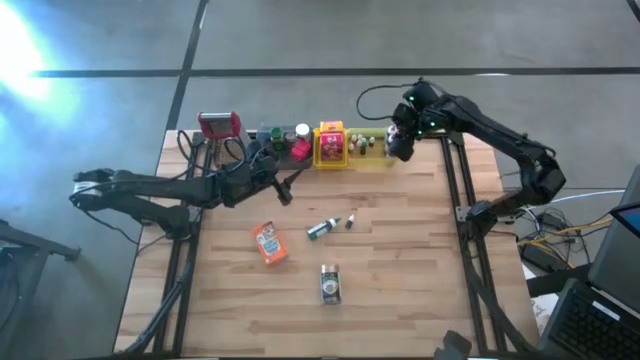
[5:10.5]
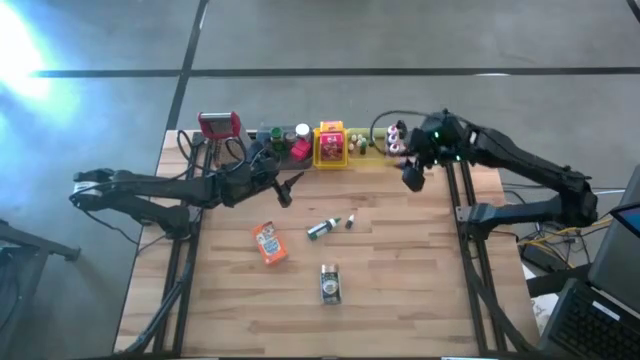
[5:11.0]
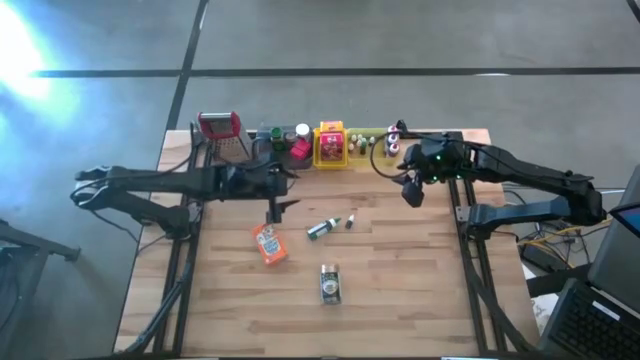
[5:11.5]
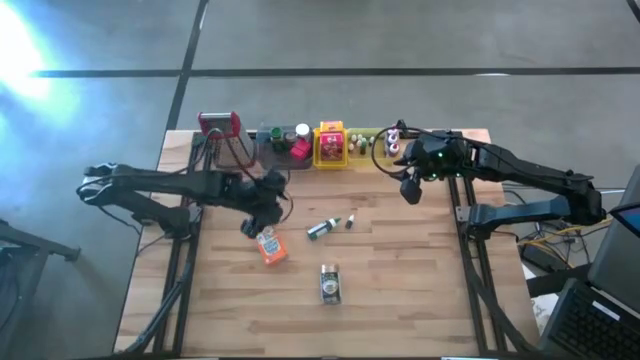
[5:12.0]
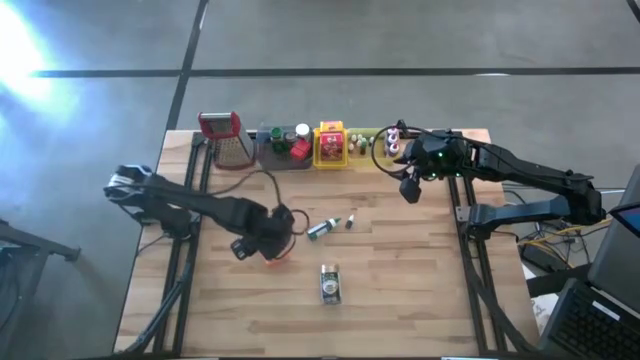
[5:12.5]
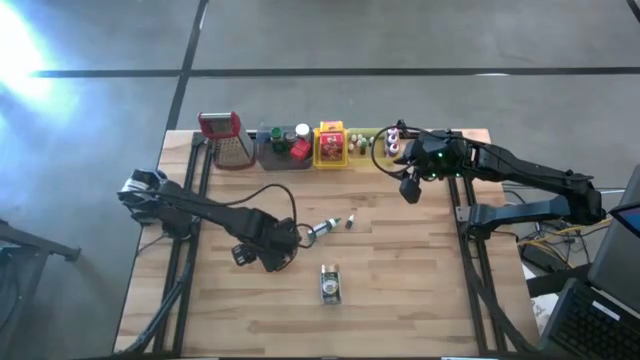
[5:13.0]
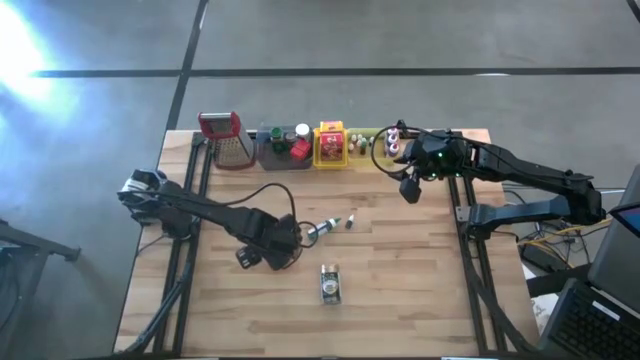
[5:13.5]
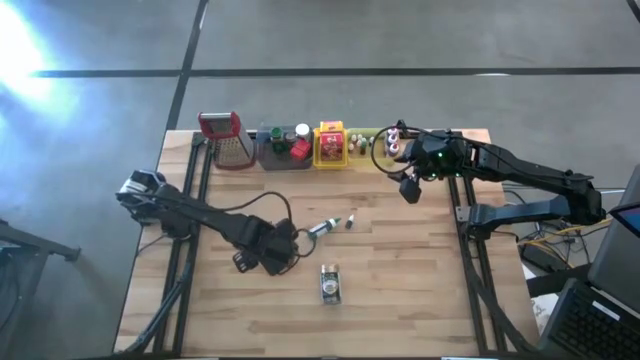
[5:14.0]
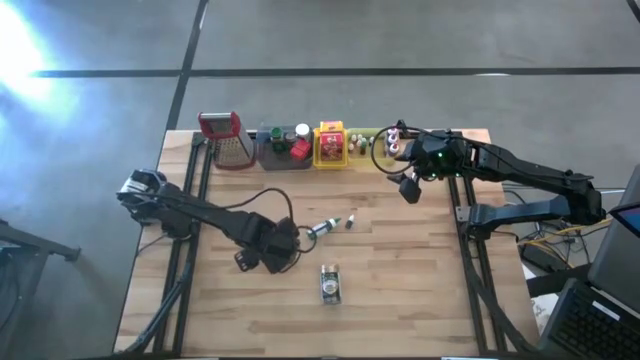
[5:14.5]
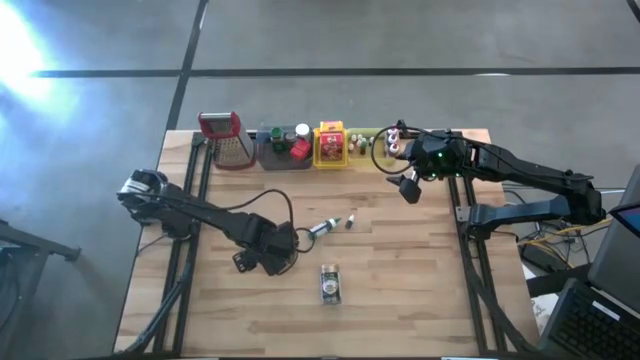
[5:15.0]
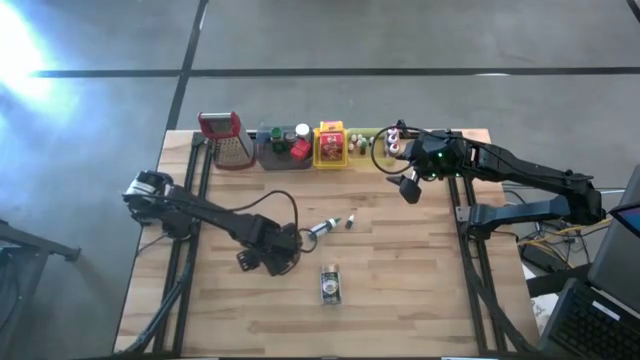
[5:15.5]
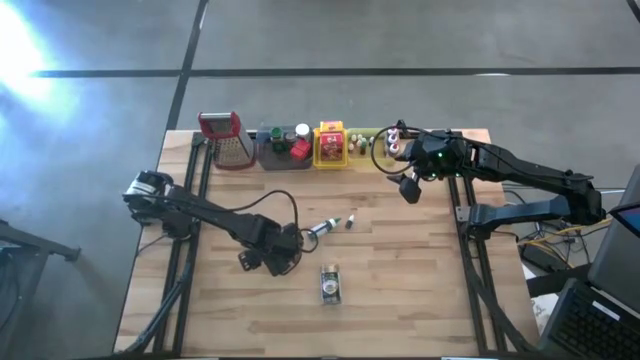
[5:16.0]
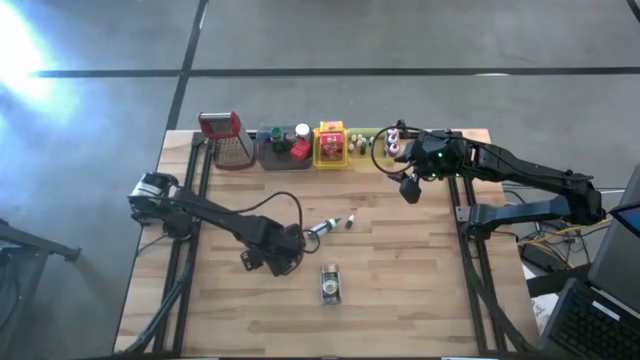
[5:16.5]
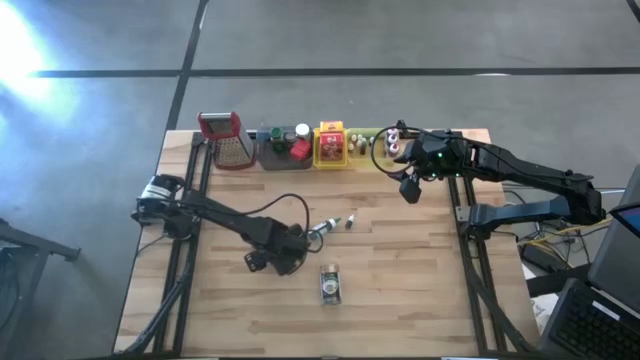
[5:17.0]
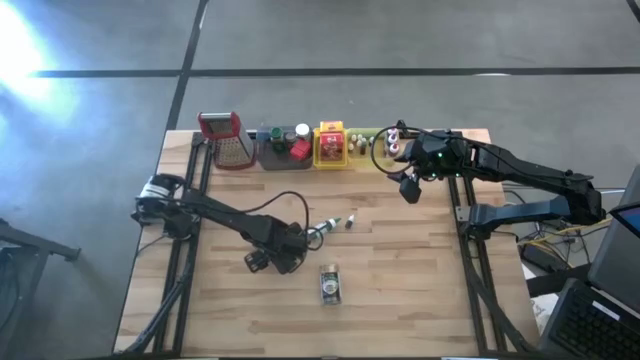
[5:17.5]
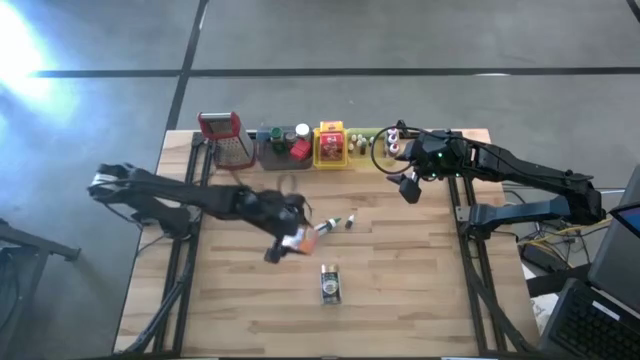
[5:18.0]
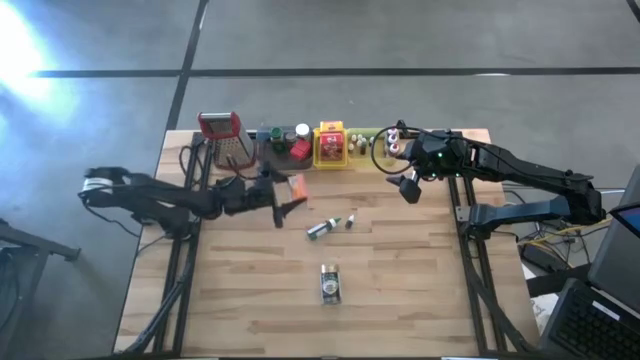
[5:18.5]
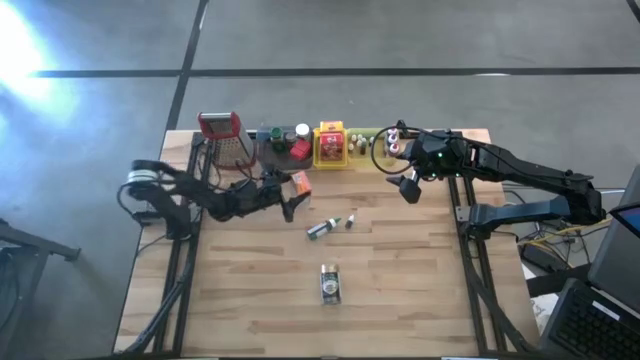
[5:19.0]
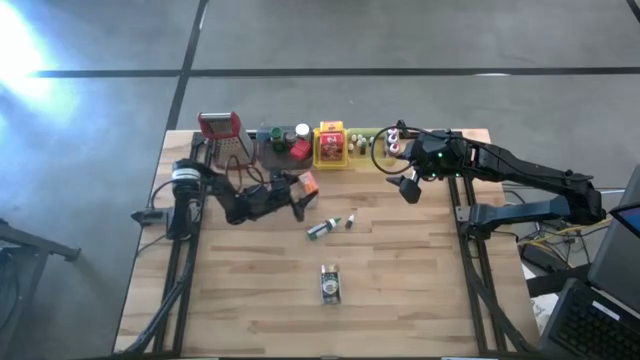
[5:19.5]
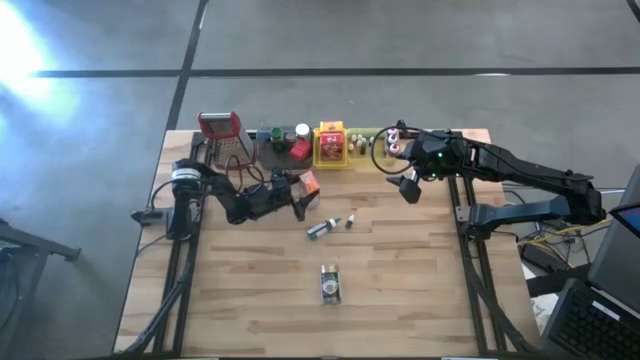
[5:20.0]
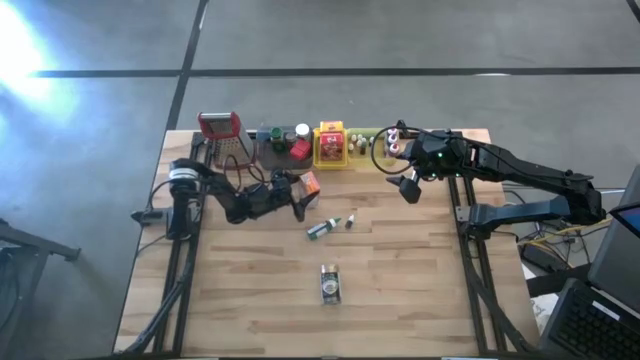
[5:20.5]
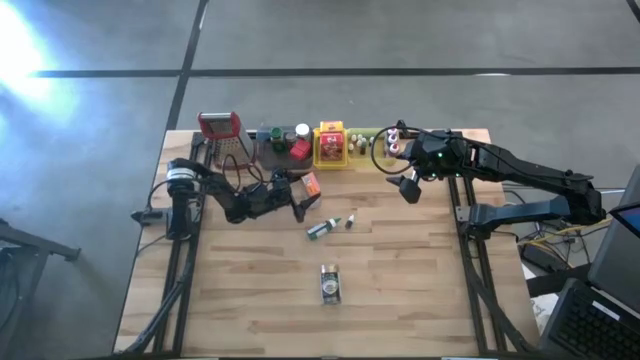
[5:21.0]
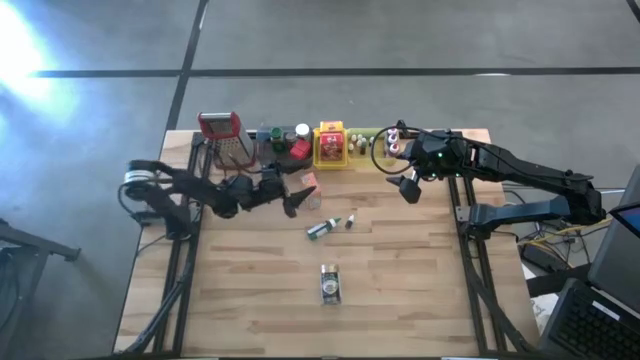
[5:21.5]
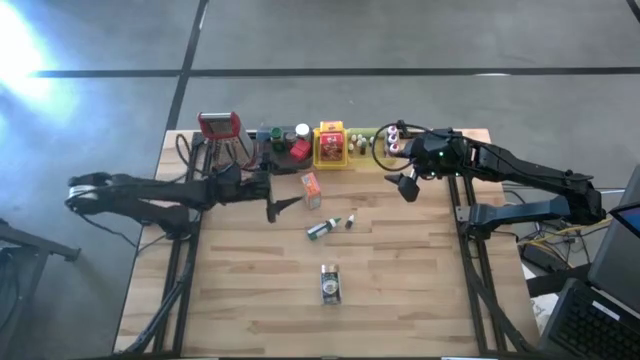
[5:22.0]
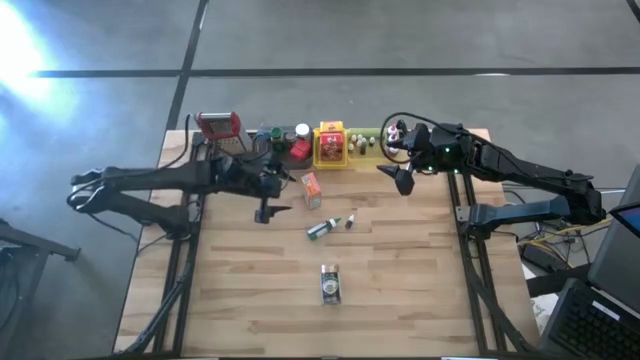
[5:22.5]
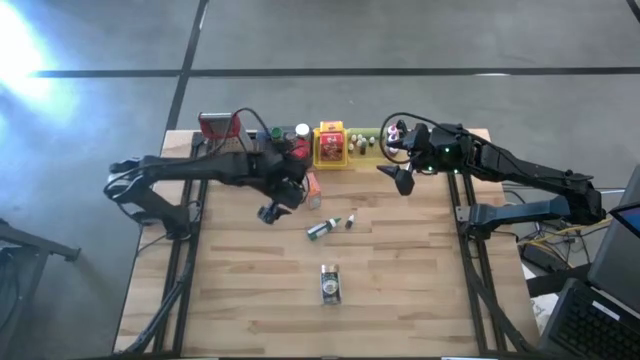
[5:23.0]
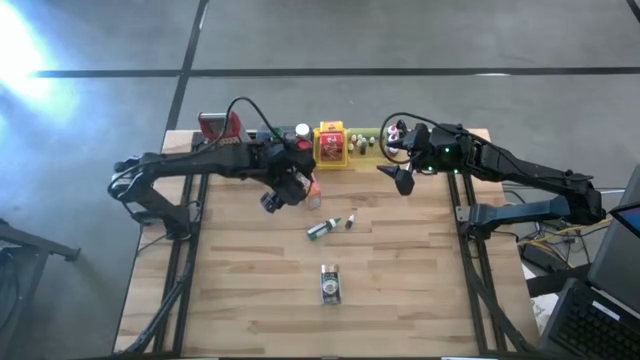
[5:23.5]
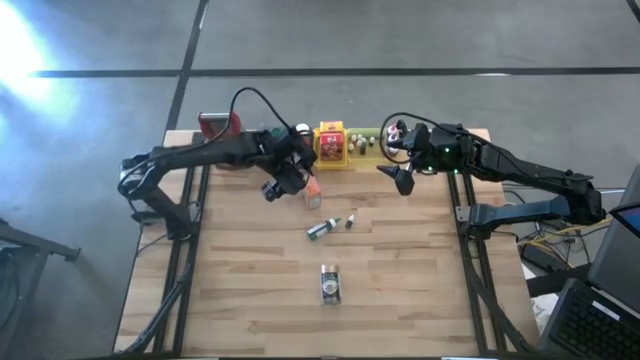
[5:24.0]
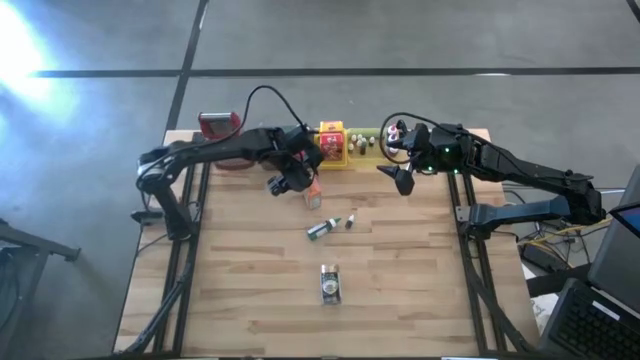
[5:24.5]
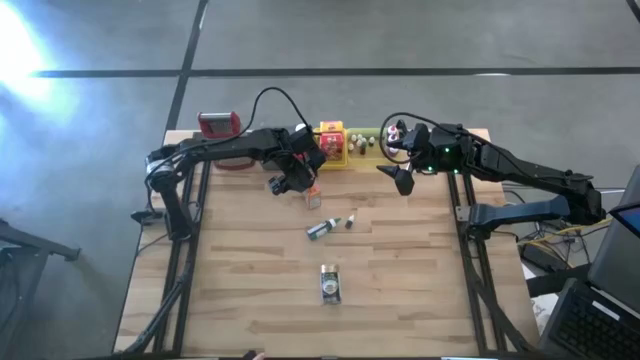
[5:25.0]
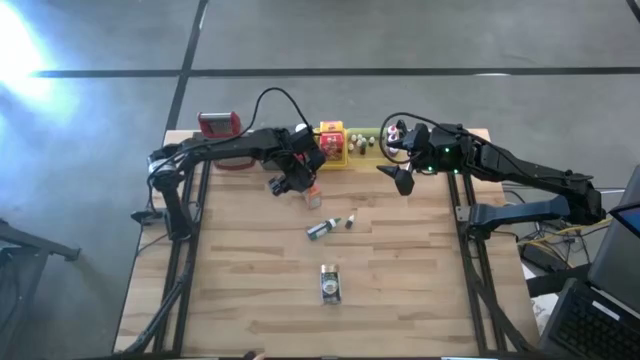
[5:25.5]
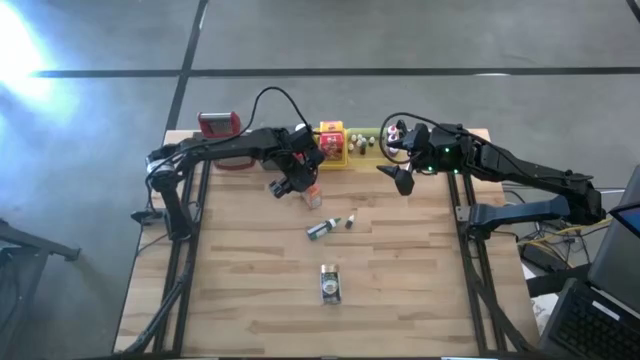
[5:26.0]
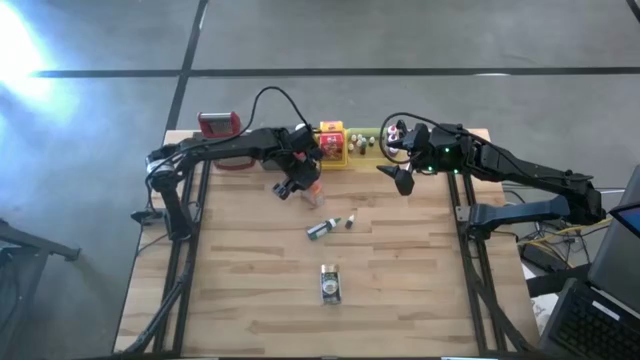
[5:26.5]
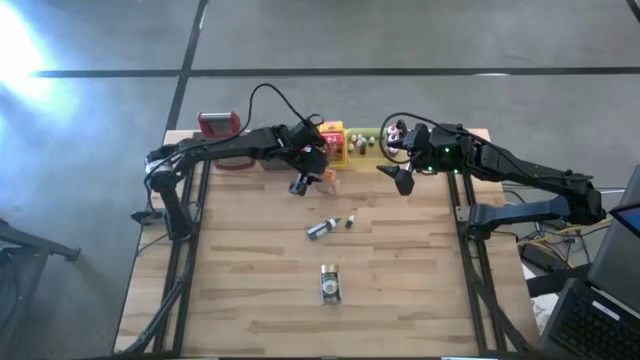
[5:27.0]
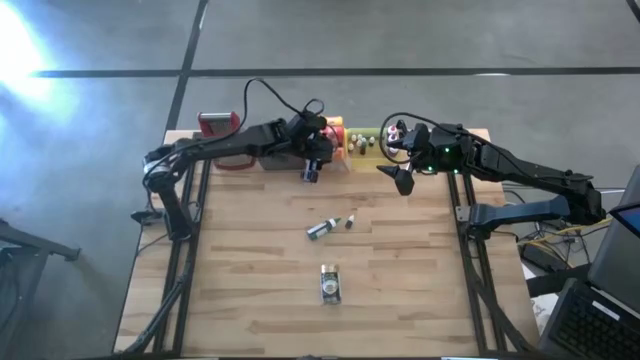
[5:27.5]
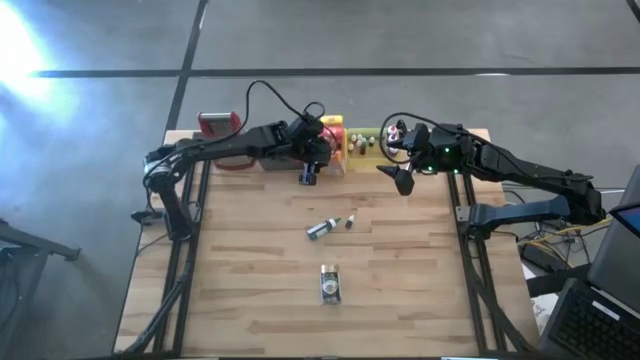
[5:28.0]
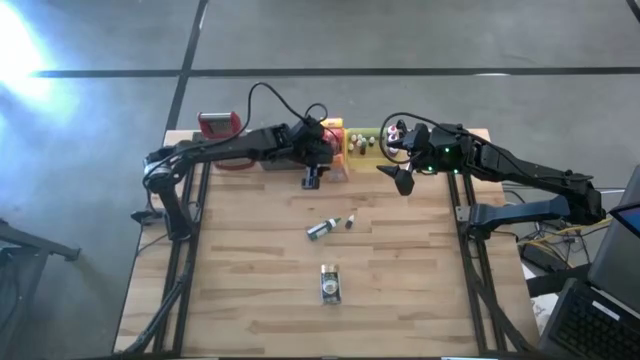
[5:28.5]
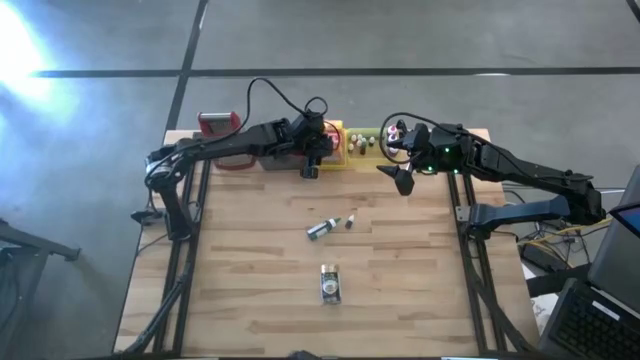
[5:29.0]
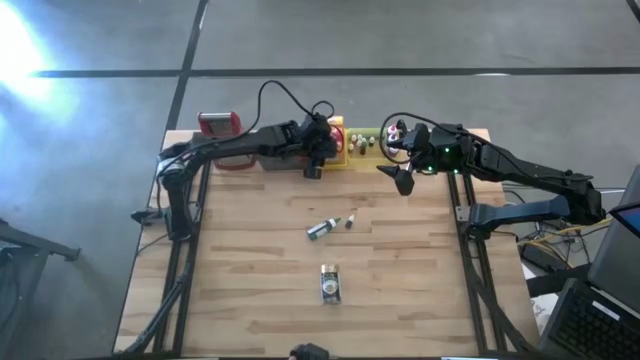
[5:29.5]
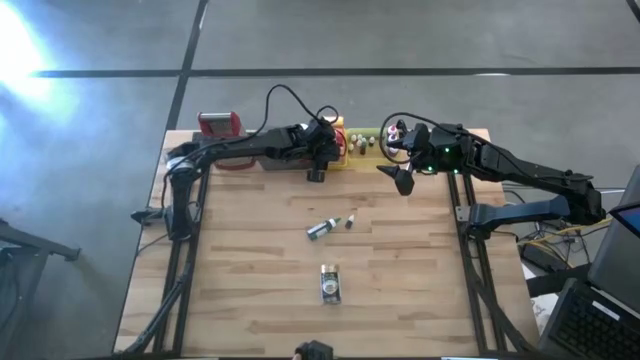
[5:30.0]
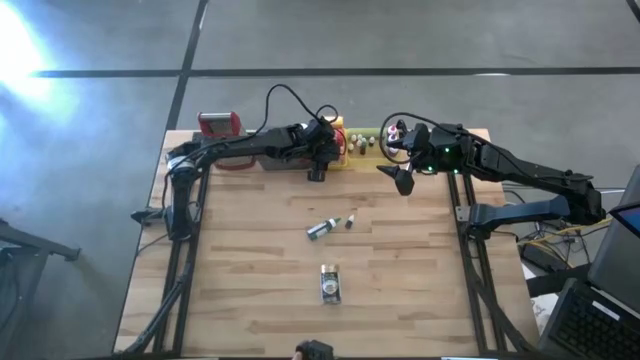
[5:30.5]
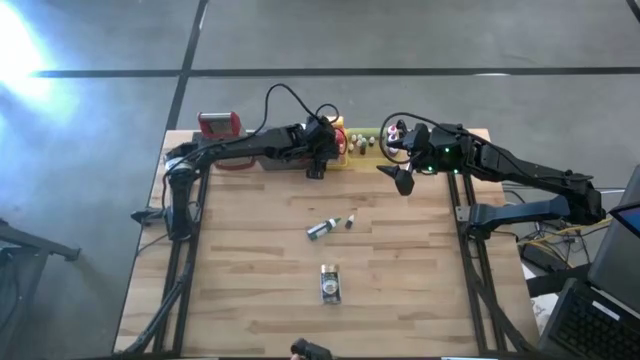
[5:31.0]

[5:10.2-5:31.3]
Task: Pick & Place Kitchen Items
Put the orange cereal box into the yellow bin
